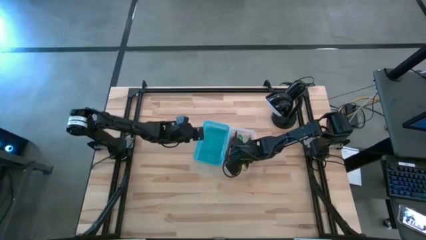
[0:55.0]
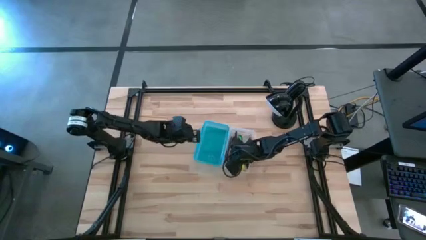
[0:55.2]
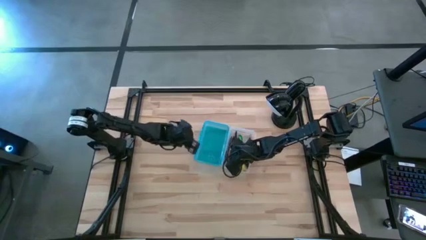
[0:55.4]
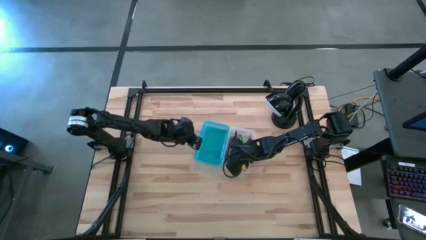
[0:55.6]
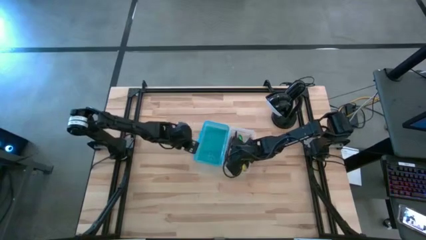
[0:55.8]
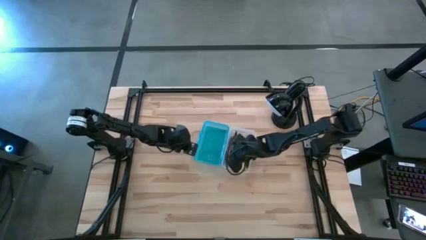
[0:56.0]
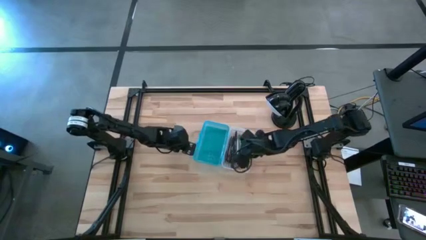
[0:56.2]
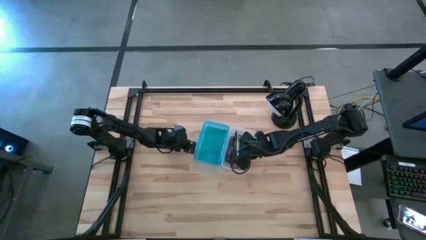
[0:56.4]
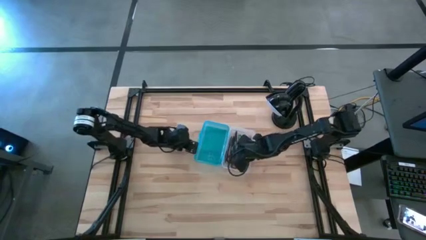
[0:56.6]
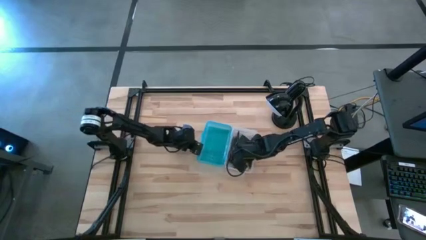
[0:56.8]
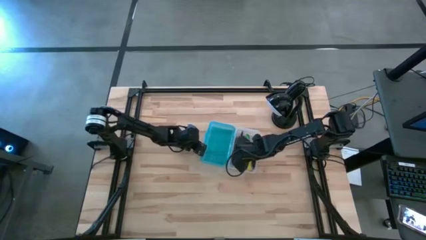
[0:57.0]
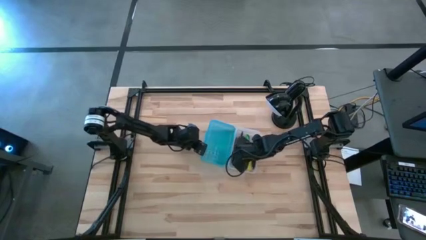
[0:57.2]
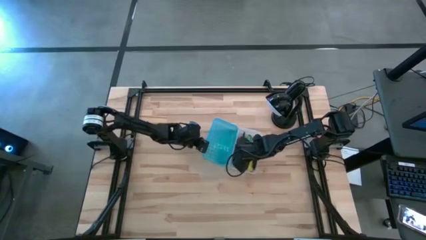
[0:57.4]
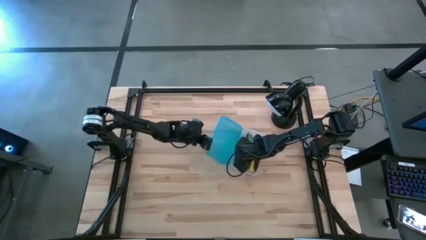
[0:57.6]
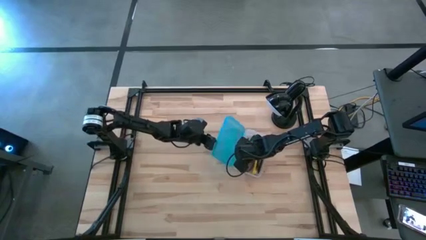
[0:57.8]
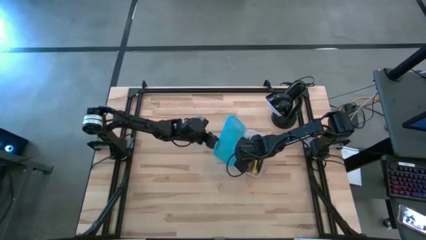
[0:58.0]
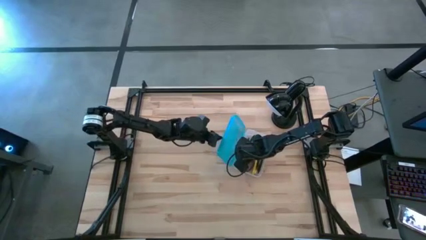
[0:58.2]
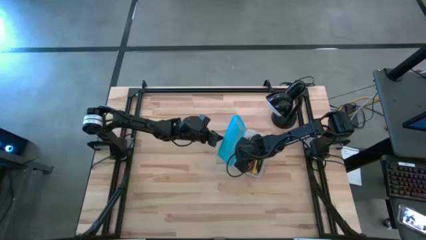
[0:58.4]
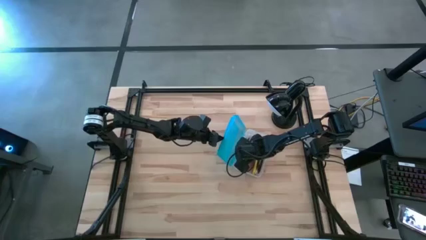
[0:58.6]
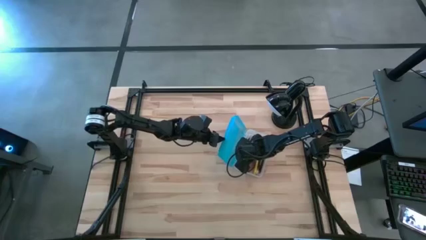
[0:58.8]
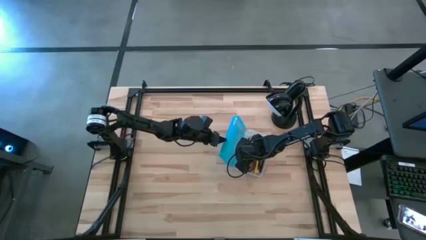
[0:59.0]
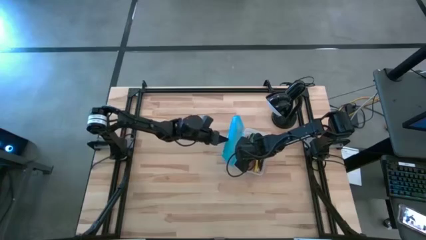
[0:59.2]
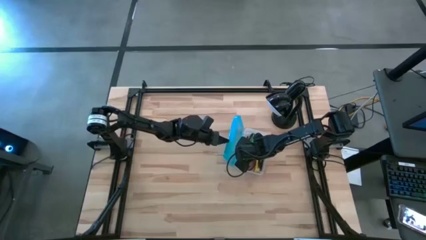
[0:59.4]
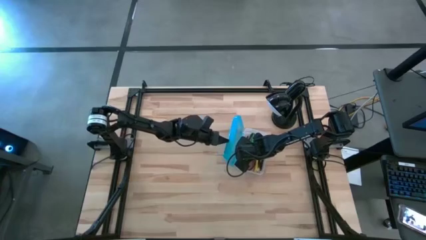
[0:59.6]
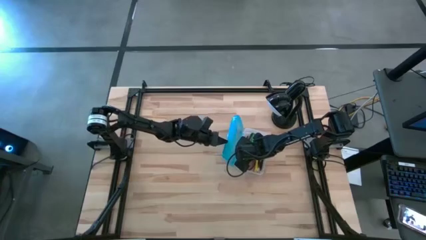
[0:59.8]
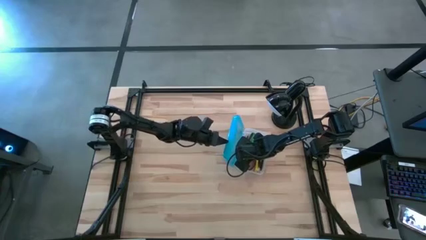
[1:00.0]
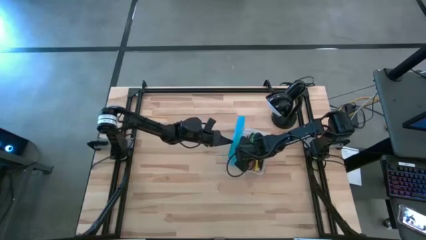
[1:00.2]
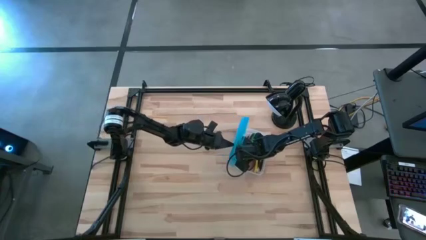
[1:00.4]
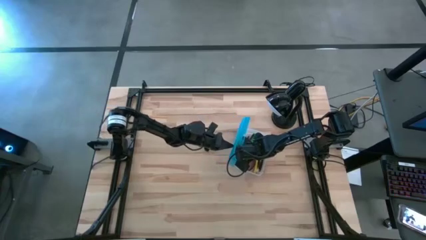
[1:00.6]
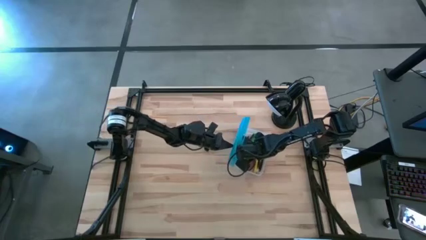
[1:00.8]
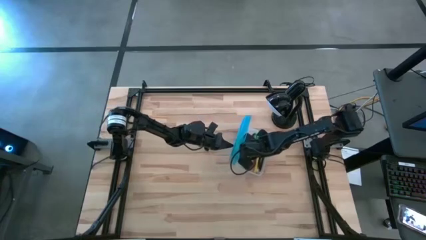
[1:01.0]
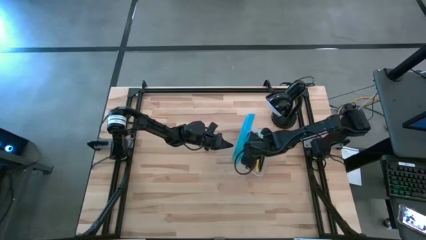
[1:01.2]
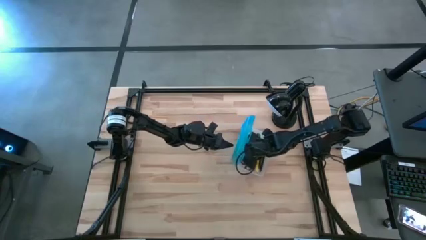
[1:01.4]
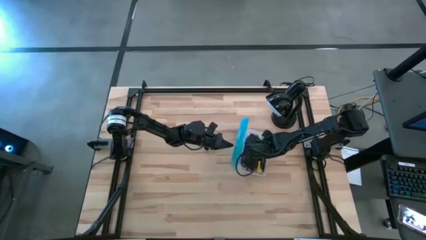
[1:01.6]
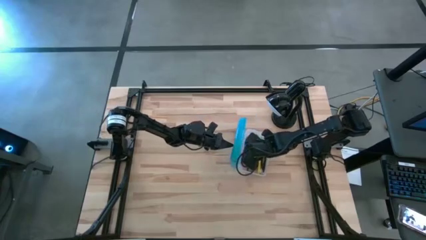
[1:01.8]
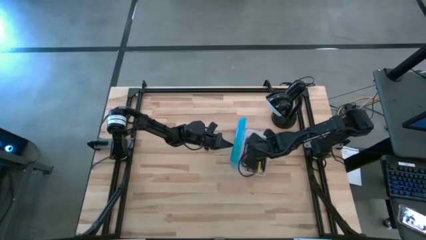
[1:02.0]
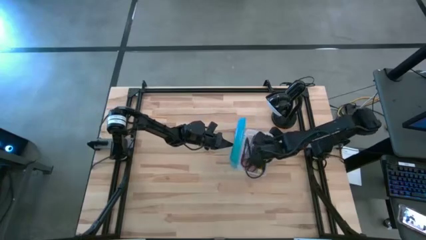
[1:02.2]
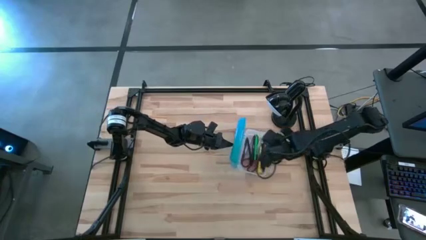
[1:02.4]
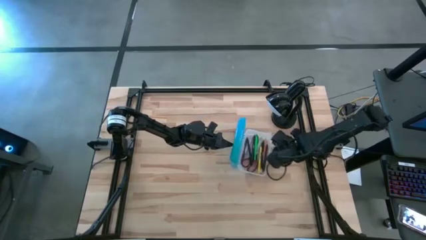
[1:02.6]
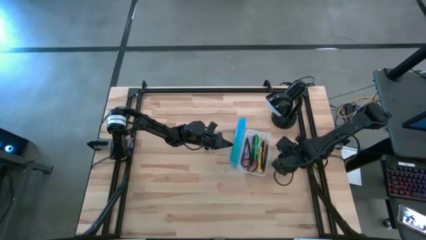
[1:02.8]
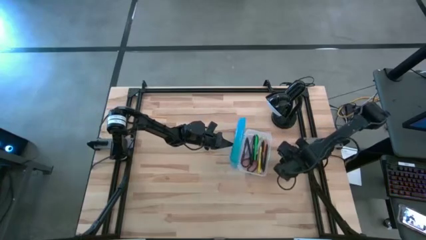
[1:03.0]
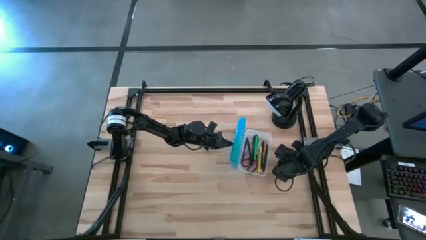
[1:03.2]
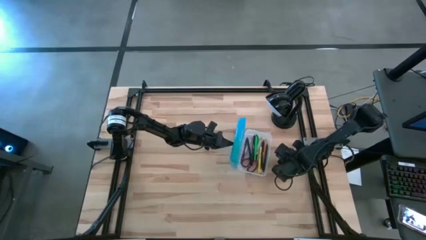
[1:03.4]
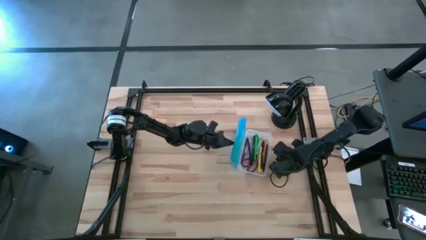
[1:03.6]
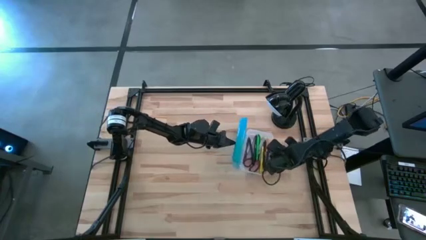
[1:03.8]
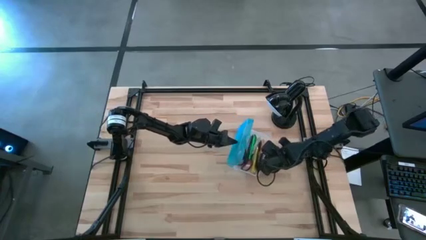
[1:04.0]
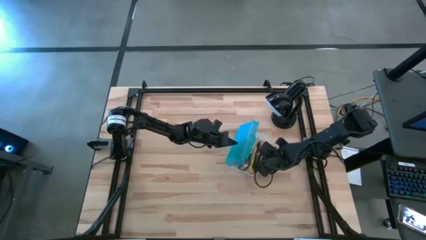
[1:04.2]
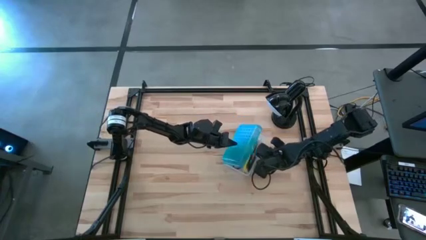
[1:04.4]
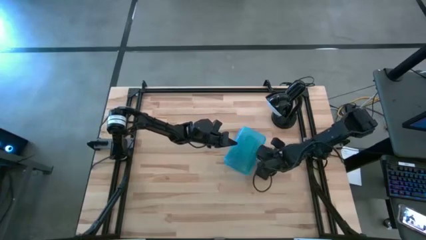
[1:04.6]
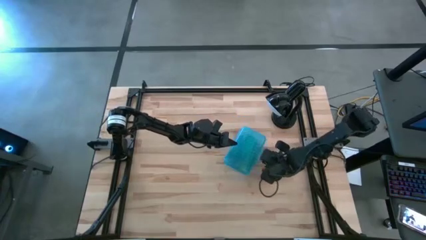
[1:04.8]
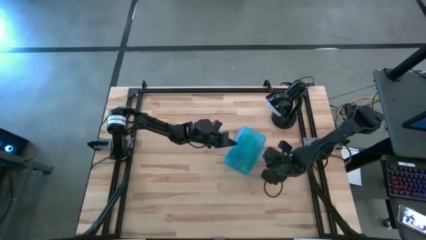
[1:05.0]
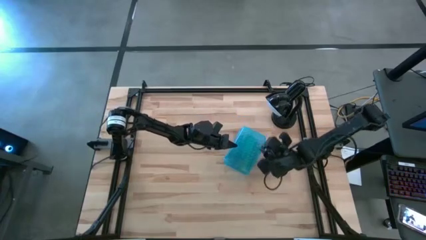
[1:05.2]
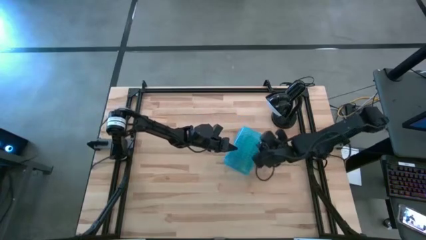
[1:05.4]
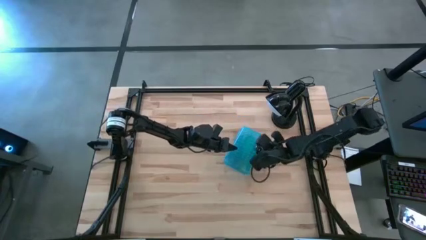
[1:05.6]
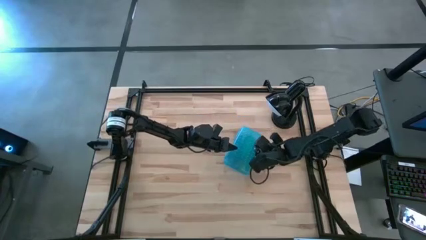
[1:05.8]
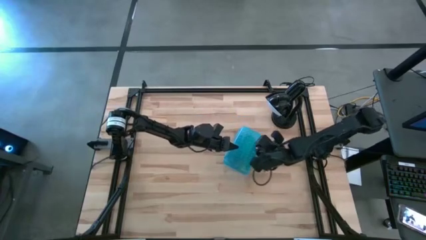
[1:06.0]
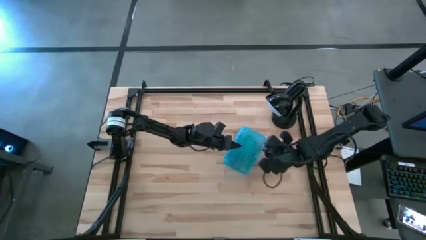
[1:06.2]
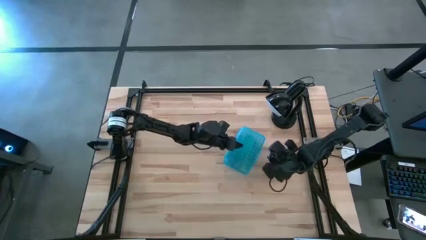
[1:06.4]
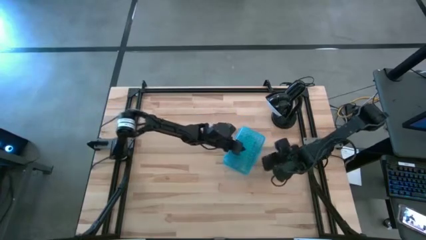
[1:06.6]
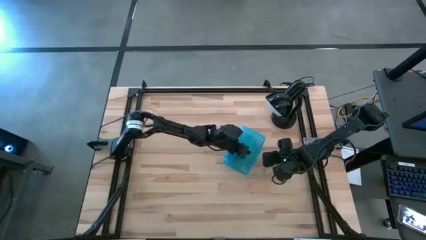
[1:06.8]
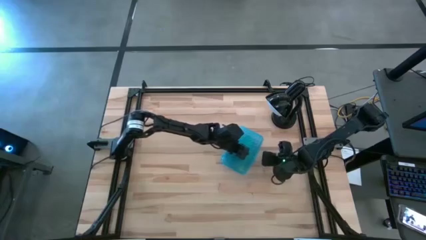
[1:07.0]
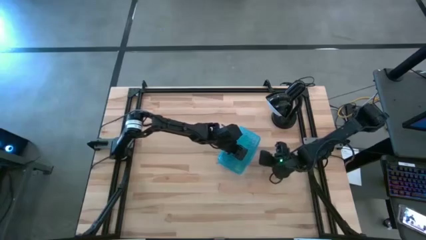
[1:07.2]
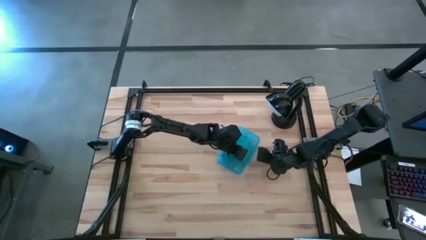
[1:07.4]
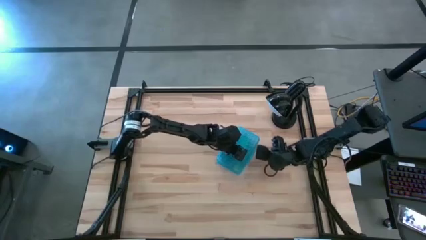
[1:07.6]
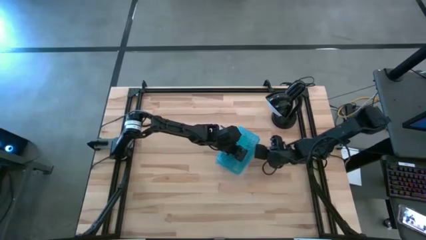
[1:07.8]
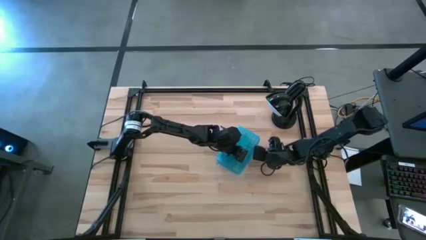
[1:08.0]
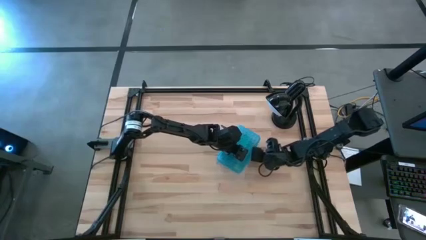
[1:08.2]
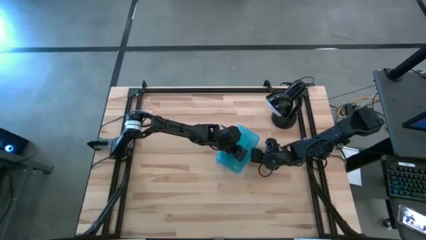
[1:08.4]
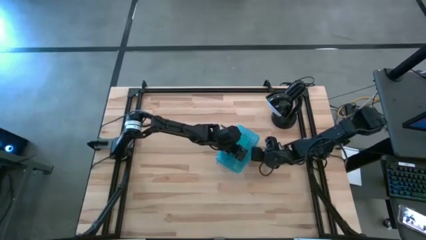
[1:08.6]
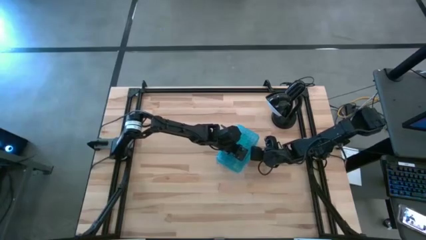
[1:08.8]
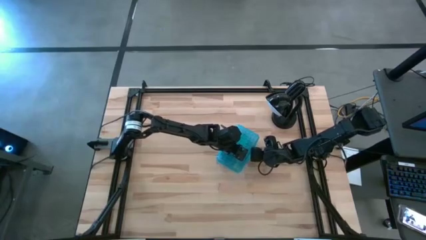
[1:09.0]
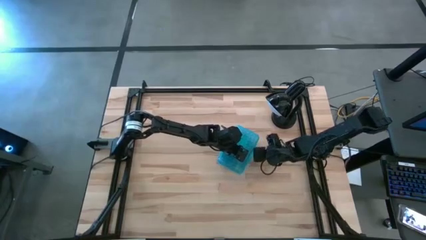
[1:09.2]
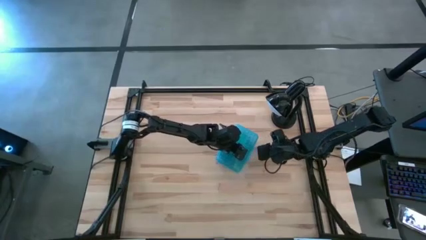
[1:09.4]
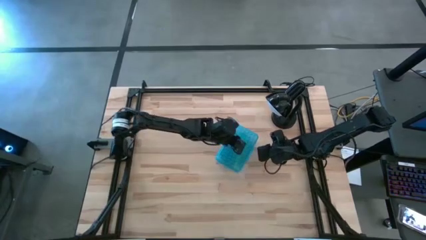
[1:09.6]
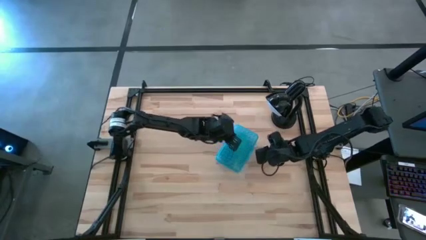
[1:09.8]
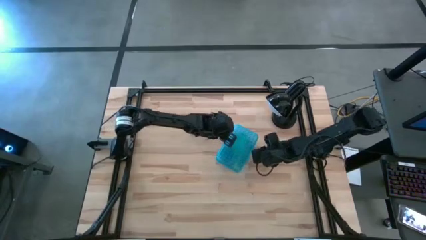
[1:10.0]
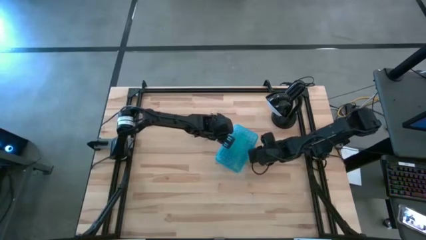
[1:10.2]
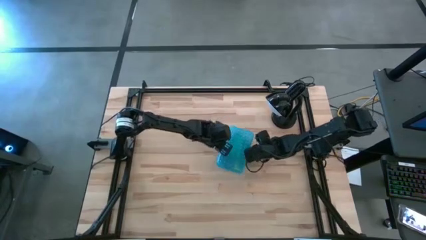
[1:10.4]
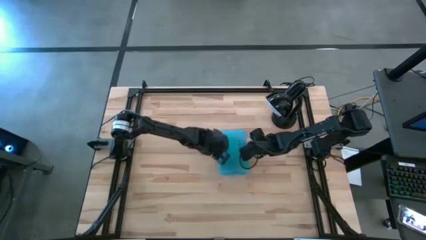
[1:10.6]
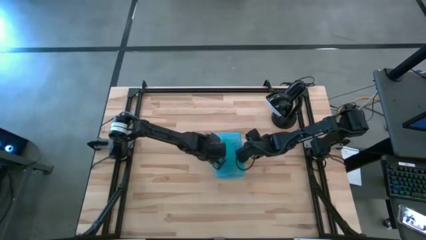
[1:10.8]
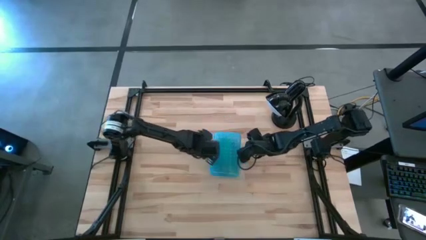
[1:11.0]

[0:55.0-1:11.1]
Task: Pick & place school supplies into a supply box
Close the supply box
